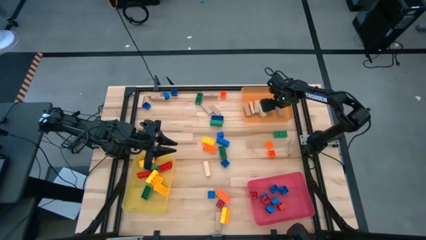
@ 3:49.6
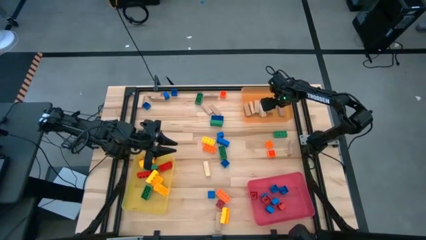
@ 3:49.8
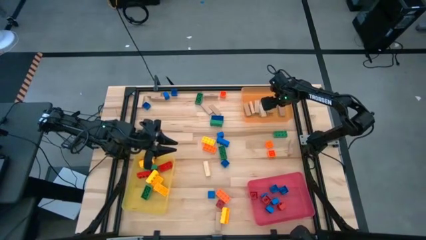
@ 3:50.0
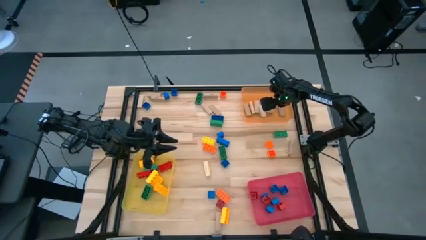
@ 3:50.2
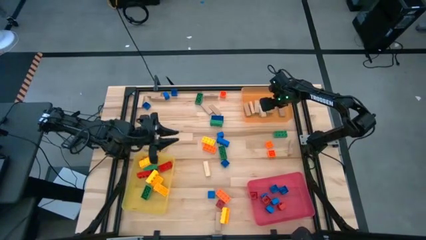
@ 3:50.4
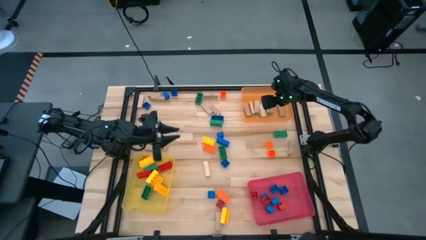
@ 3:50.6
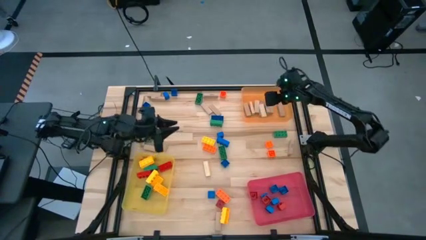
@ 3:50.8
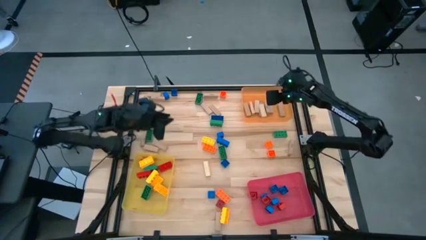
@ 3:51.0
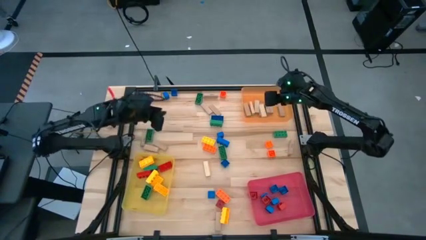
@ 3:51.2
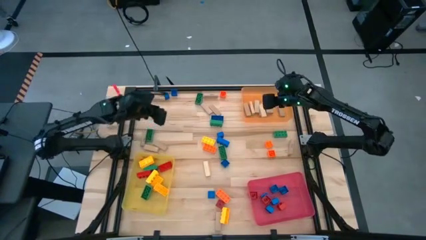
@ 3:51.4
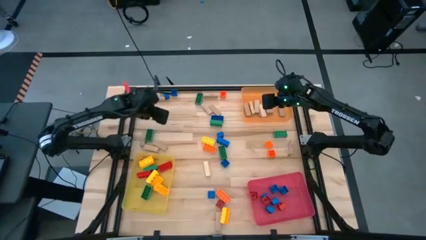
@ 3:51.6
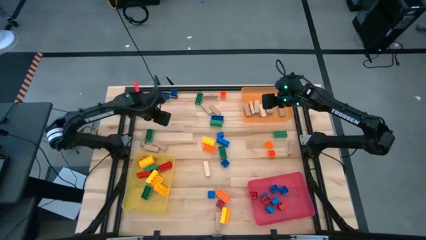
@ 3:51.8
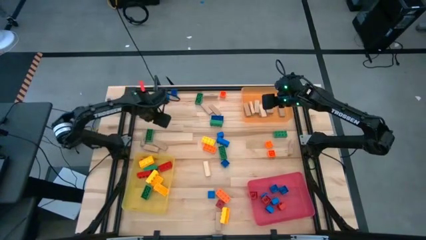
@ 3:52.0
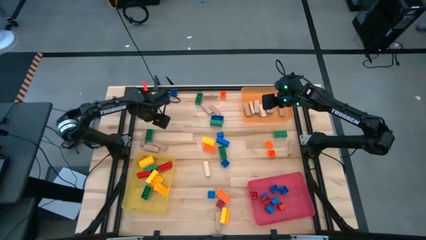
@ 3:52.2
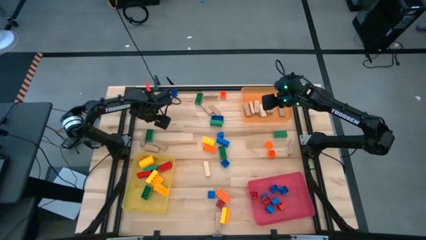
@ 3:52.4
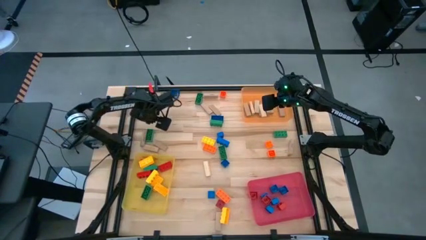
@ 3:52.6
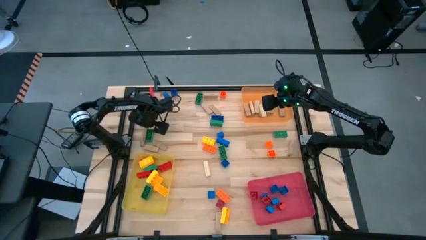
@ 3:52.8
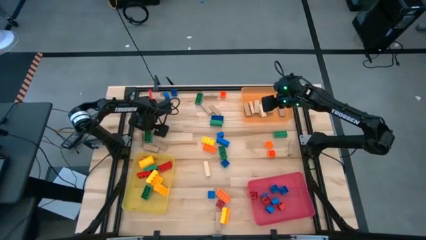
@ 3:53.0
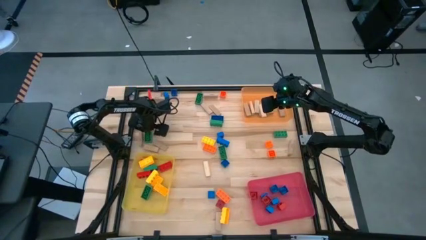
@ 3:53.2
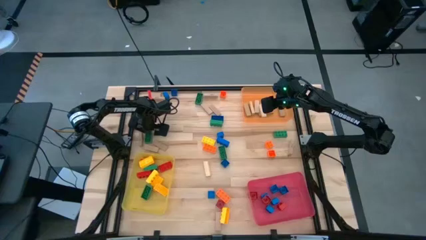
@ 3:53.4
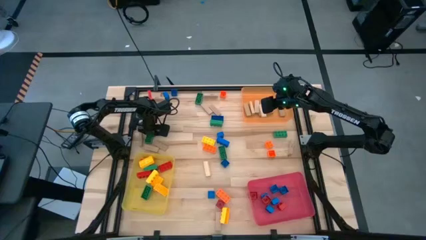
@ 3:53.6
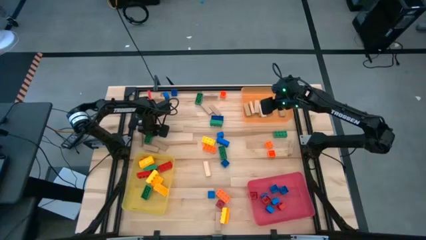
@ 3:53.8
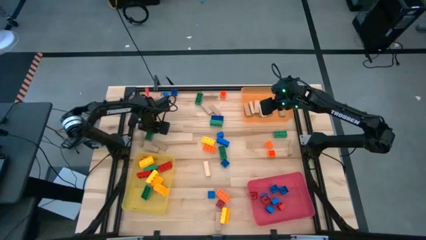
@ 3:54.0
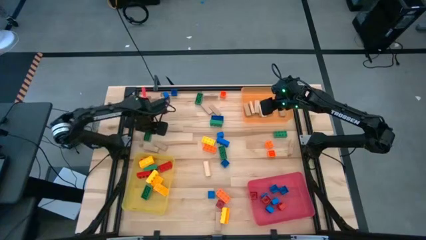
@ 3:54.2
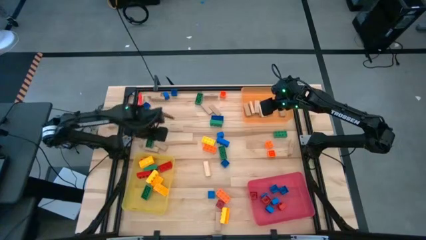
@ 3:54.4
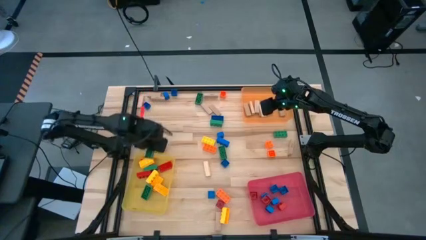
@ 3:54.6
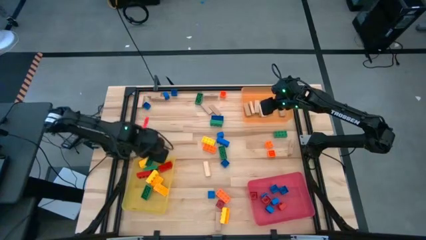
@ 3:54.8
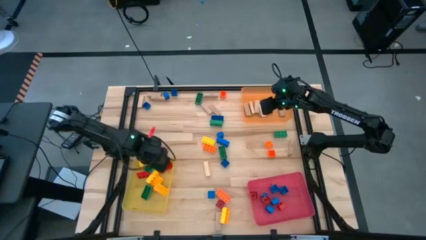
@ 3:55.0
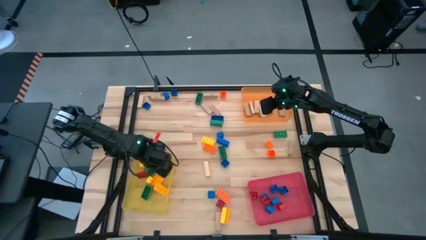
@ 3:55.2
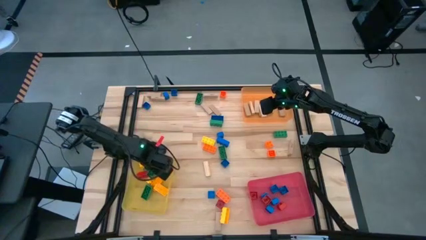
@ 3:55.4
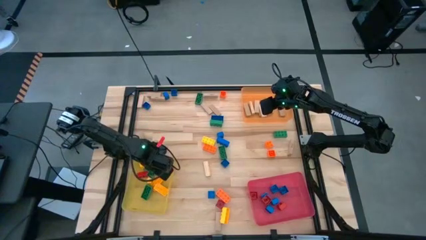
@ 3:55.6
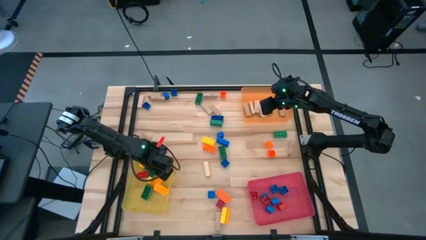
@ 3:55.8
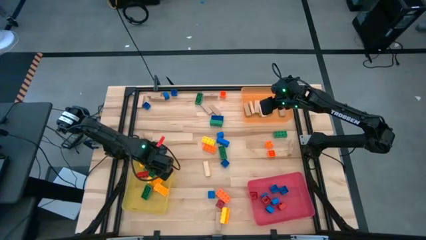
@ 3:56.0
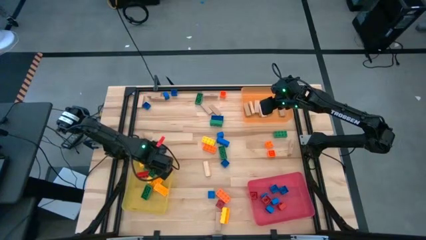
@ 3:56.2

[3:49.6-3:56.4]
Task: Sort blocks by size
Put the large green game piece into the yellow bin

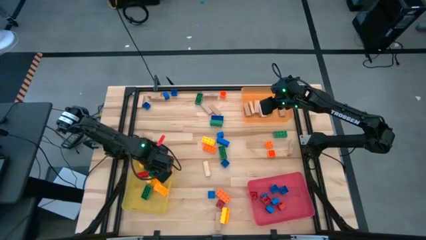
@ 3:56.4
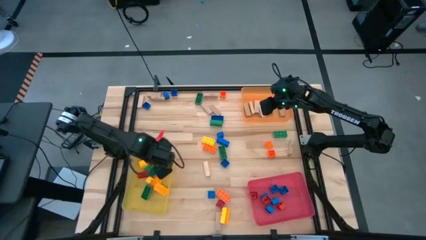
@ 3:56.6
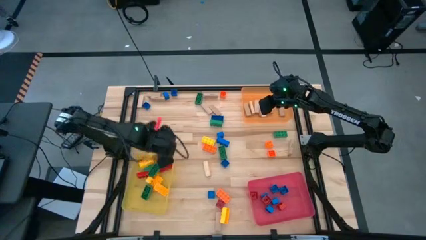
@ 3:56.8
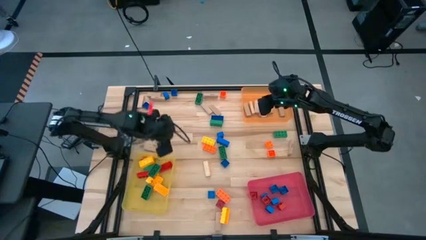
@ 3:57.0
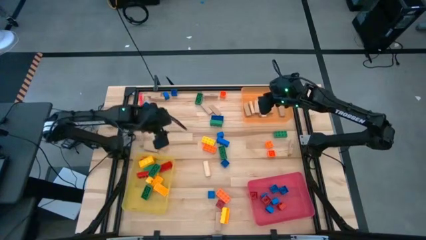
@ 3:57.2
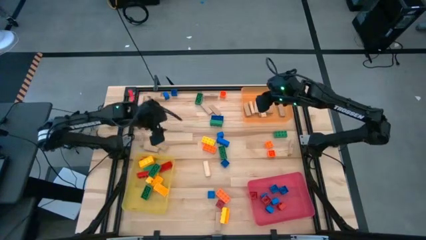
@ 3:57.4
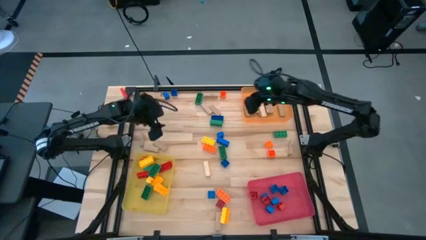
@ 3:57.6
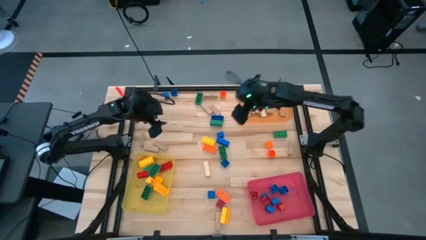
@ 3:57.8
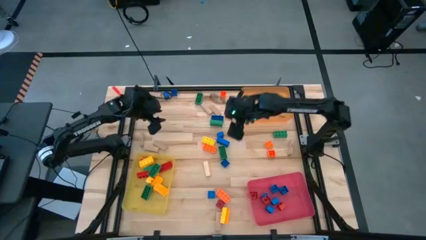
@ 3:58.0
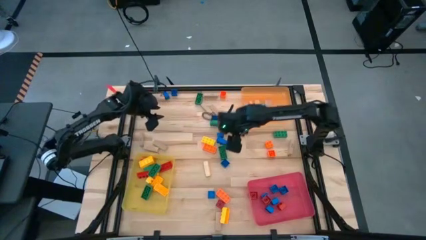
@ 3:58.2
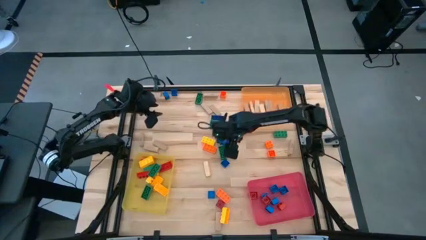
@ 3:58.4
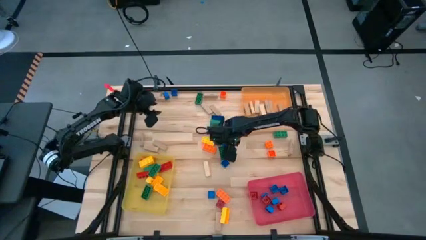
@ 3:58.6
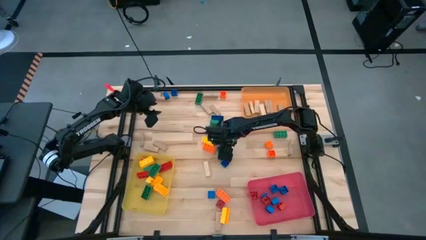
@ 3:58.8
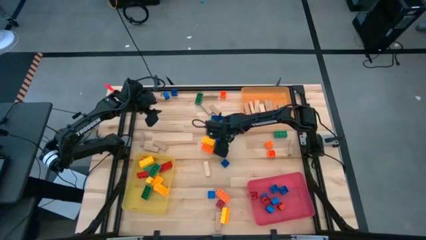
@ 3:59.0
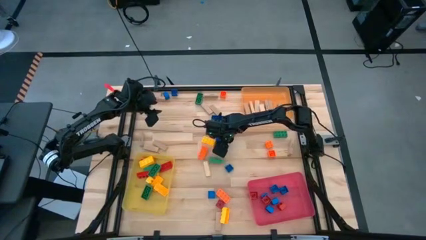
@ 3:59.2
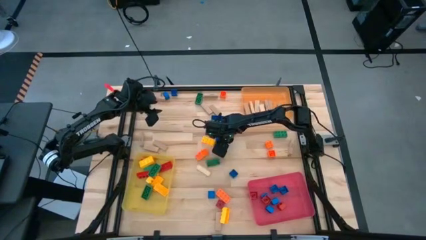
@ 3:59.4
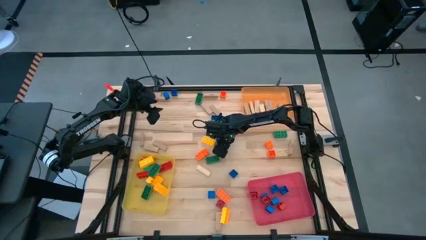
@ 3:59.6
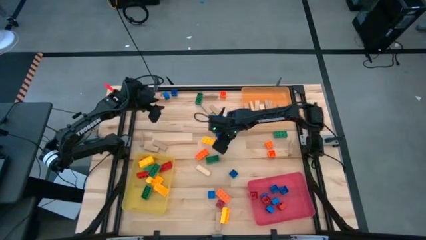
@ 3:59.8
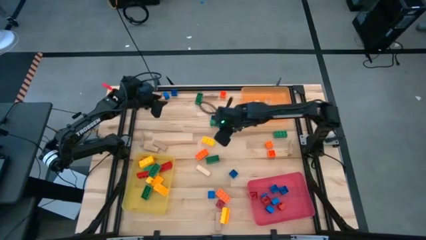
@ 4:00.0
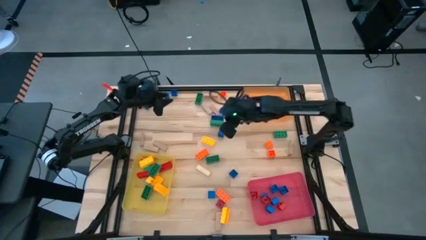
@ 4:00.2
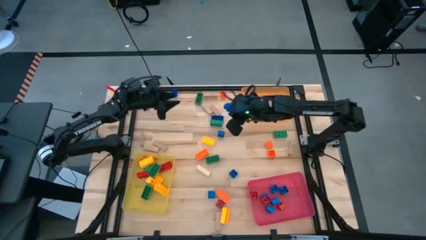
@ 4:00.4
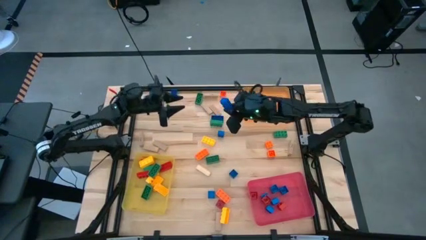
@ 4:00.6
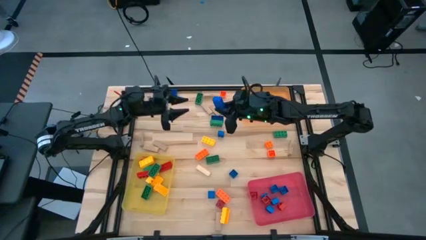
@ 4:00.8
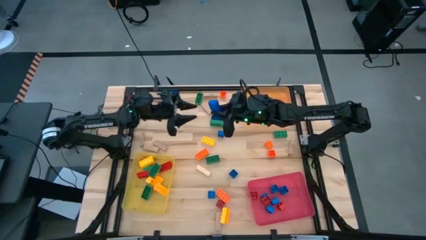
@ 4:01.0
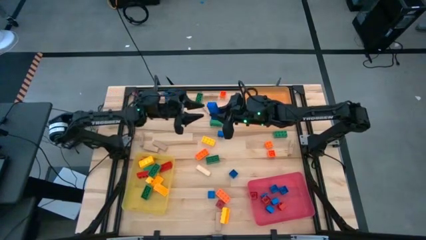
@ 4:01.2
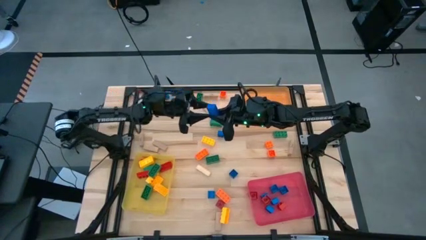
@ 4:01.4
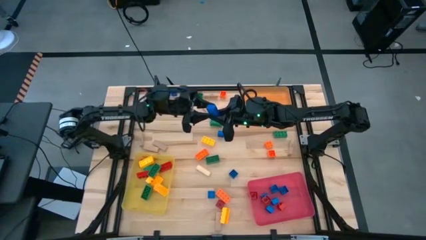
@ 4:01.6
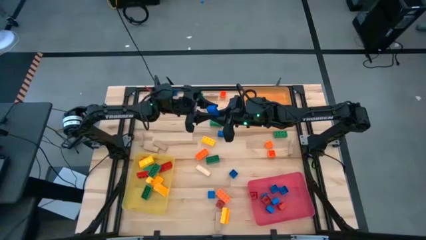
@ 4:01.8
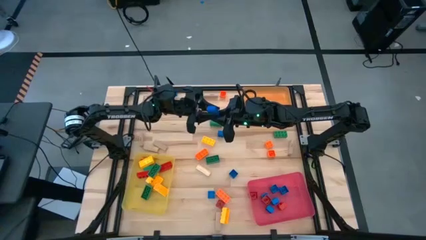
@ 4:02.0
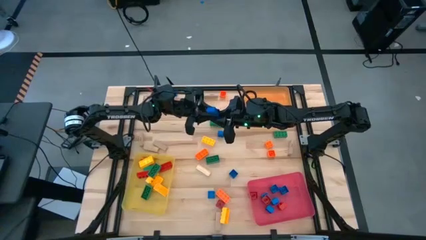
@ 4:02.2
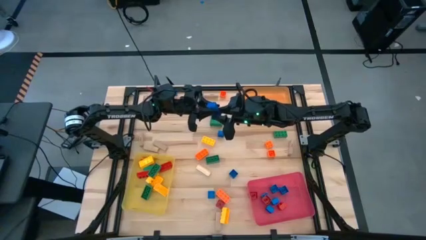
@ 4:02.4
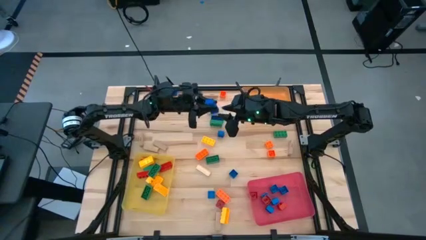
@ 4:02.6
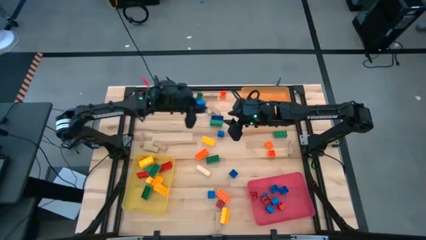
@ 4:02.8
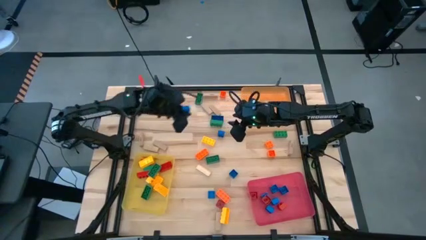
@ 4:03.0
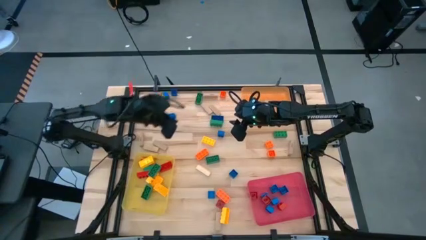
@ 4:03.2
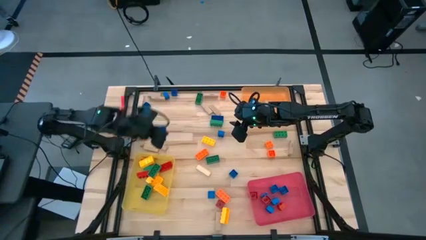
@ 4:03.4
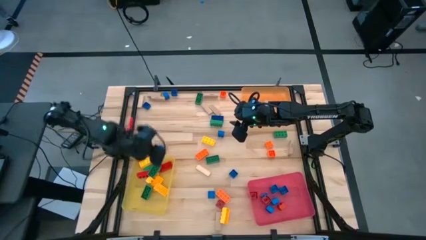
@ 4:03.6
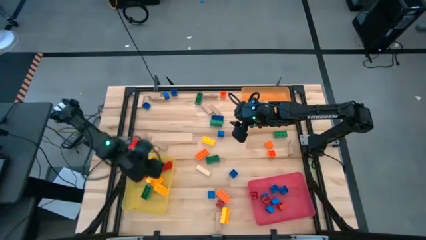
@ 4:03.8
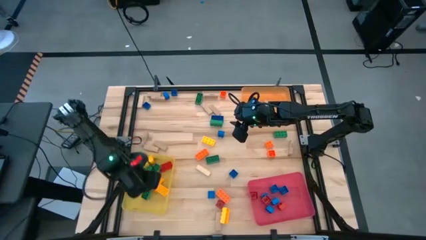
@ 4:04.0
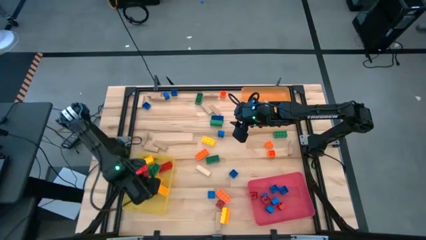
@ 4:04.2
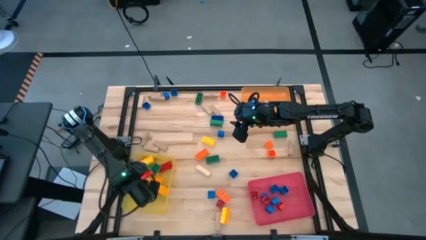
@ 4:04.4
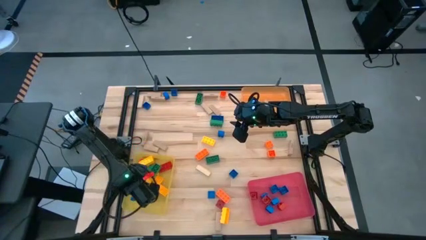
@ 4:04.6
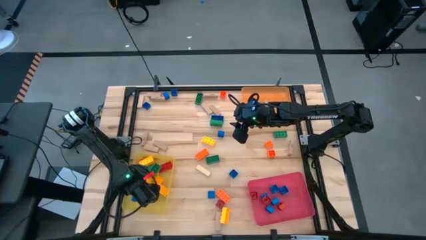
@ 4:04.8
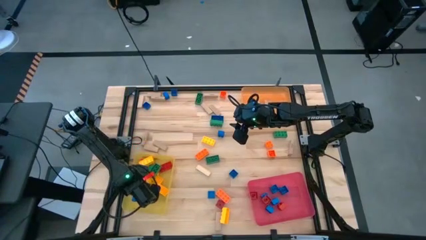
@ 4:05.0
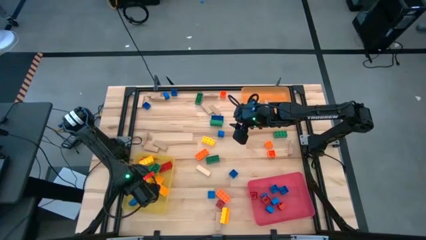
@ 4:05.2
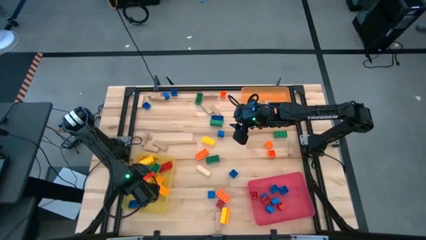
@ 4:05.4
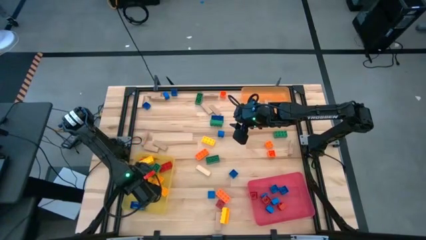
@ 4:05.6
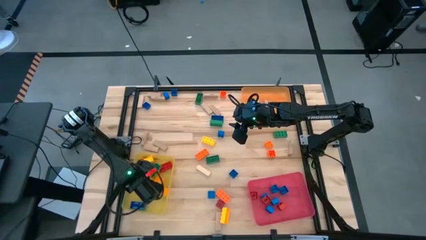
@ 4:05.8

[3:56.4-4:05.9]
Put the large blue game piece into the yellow bin
